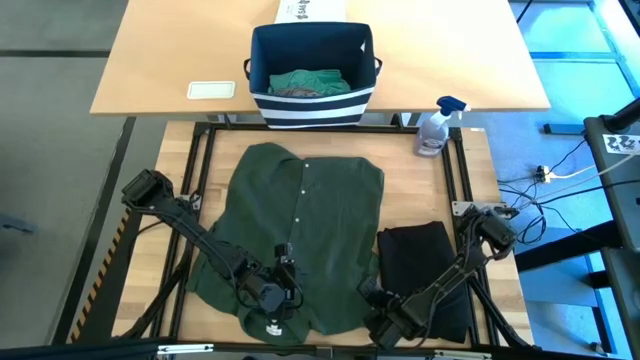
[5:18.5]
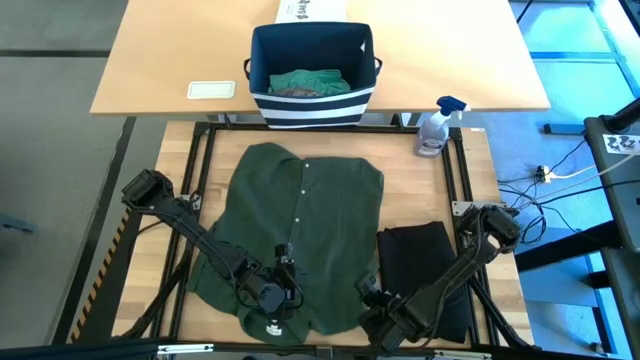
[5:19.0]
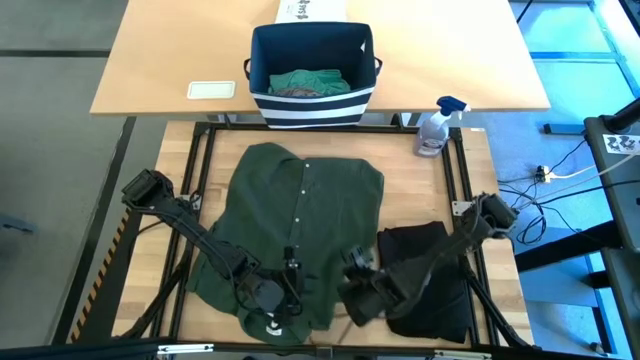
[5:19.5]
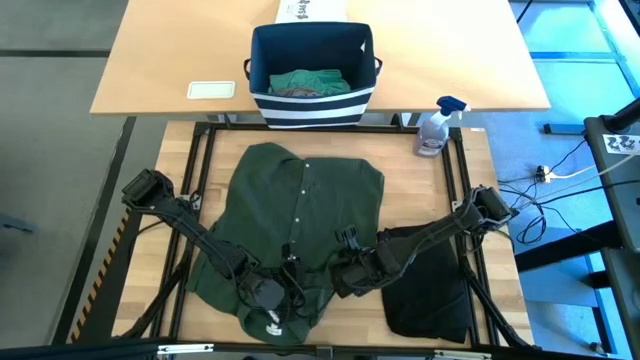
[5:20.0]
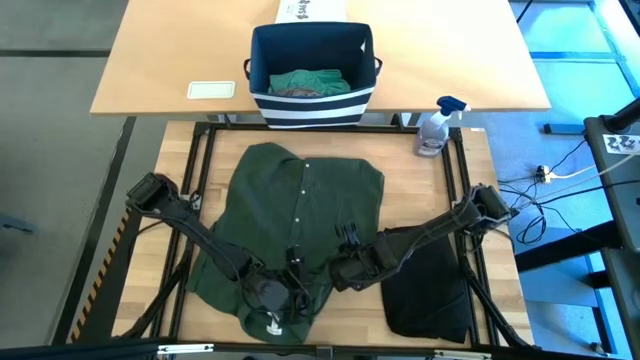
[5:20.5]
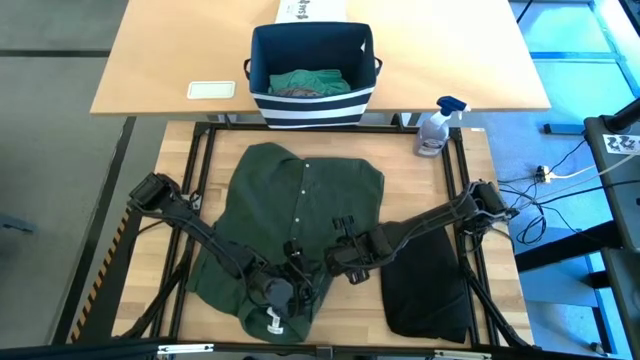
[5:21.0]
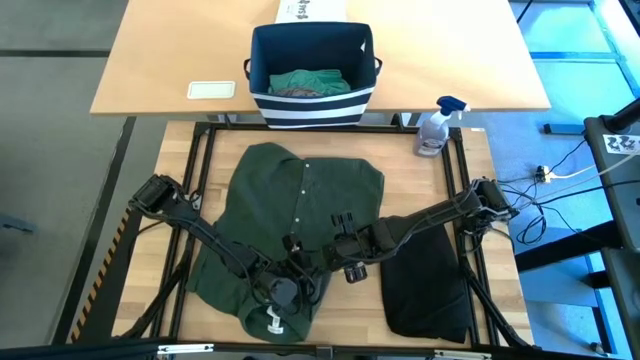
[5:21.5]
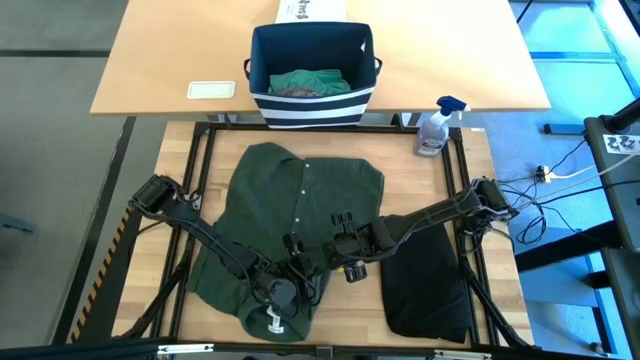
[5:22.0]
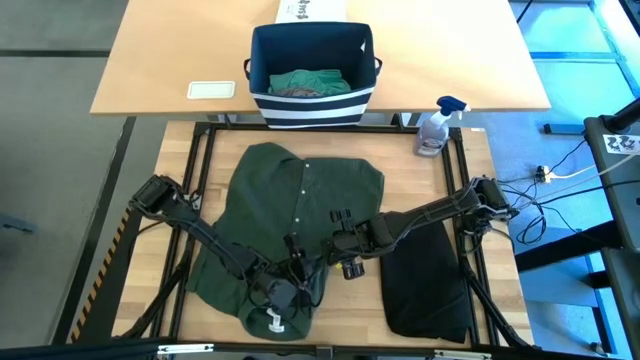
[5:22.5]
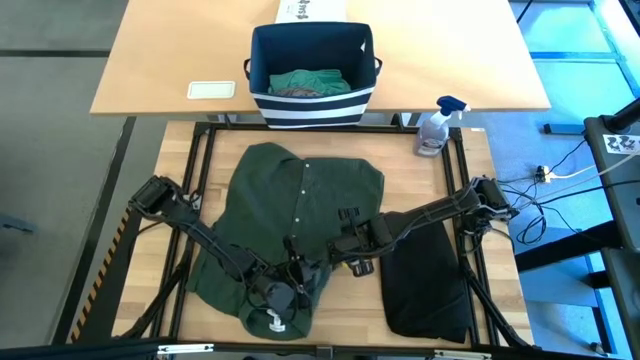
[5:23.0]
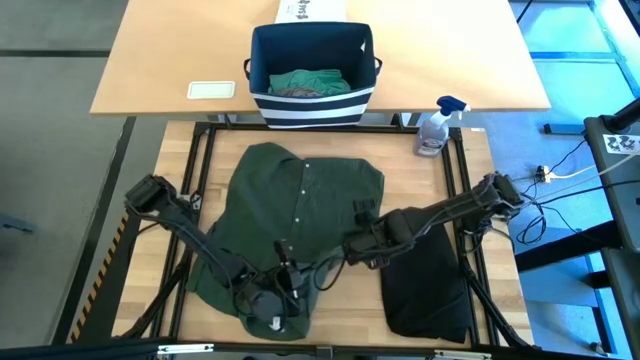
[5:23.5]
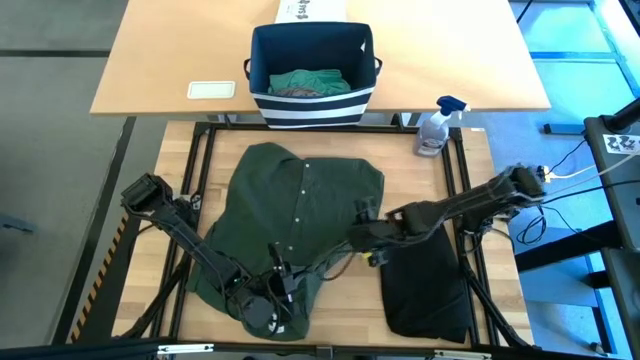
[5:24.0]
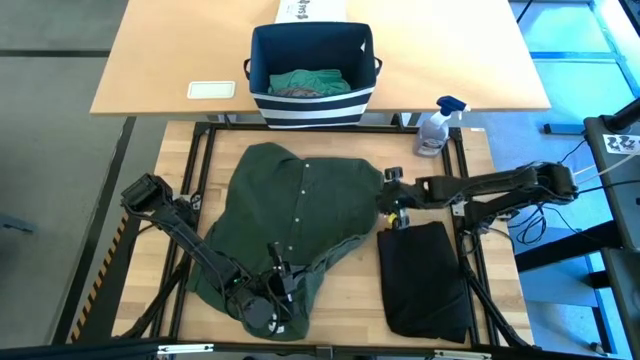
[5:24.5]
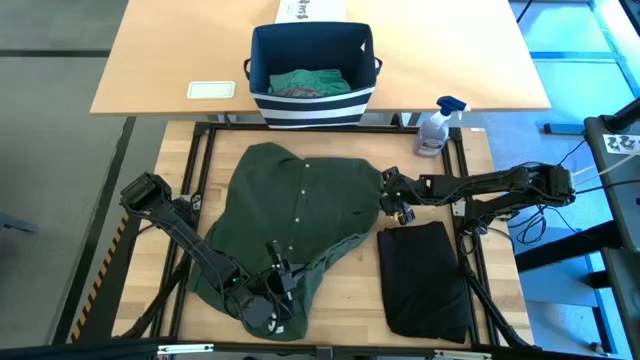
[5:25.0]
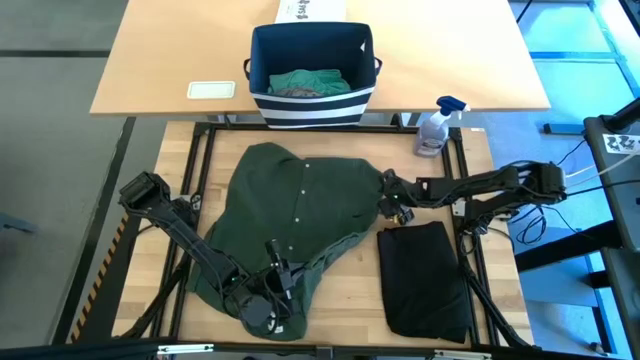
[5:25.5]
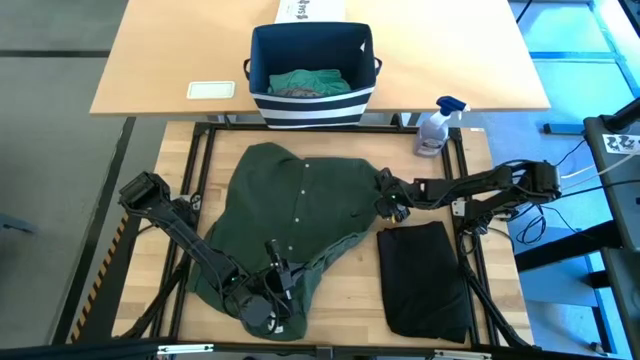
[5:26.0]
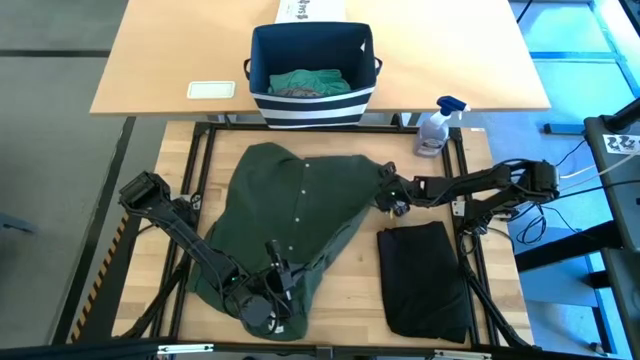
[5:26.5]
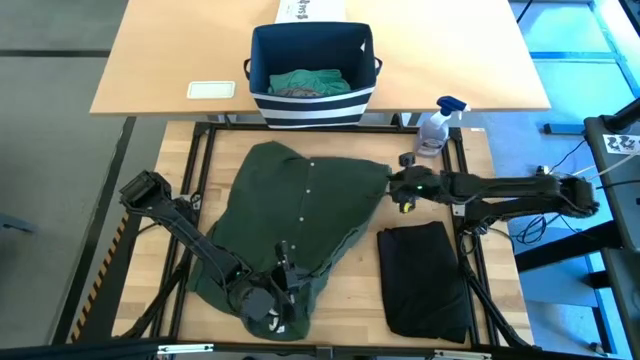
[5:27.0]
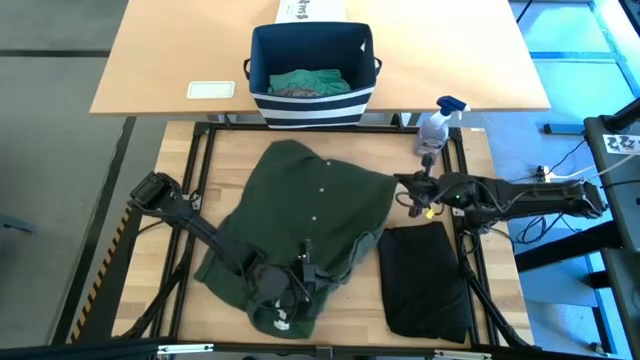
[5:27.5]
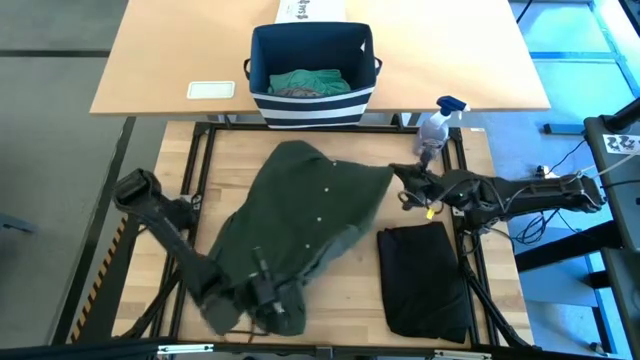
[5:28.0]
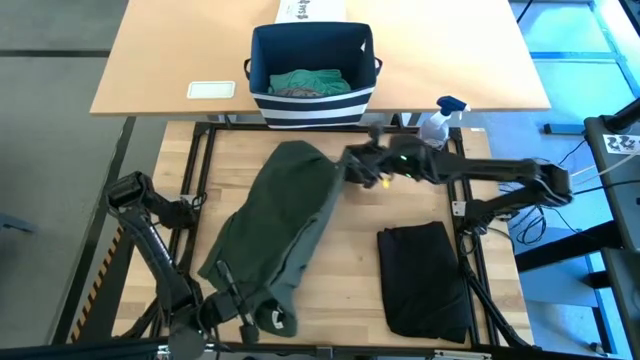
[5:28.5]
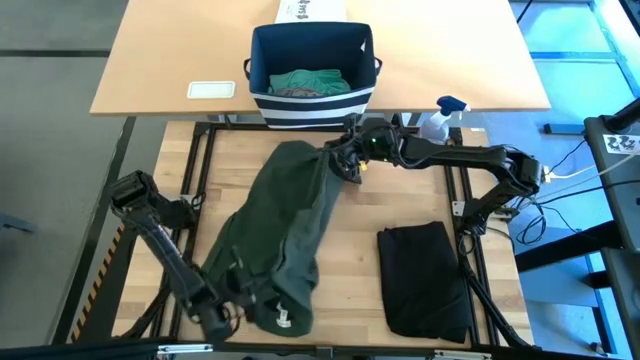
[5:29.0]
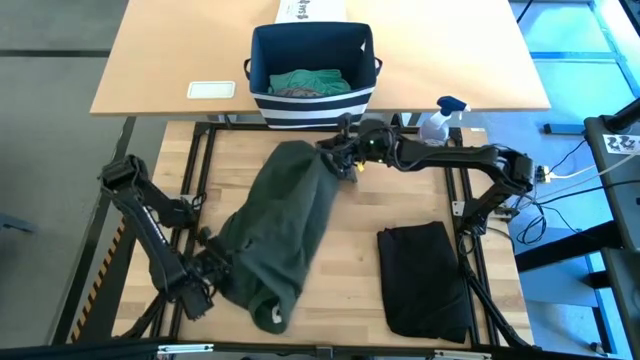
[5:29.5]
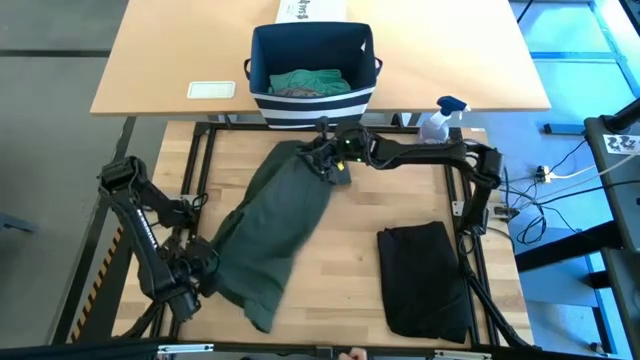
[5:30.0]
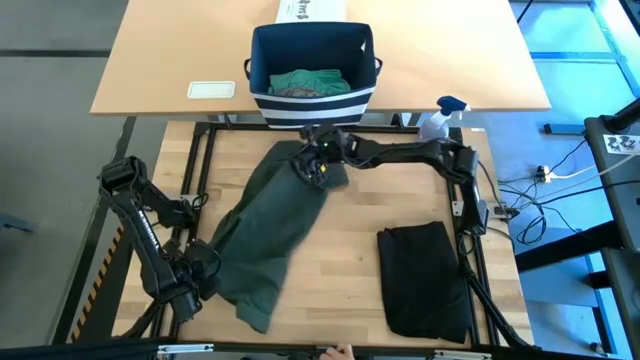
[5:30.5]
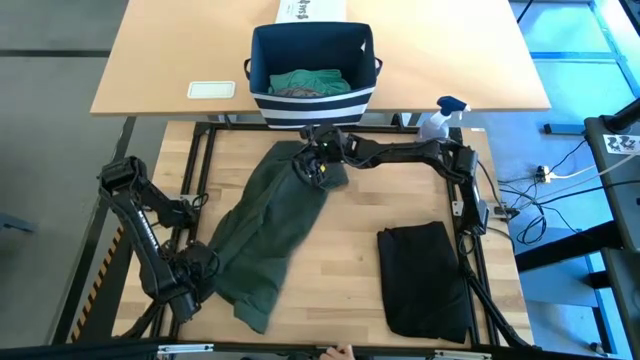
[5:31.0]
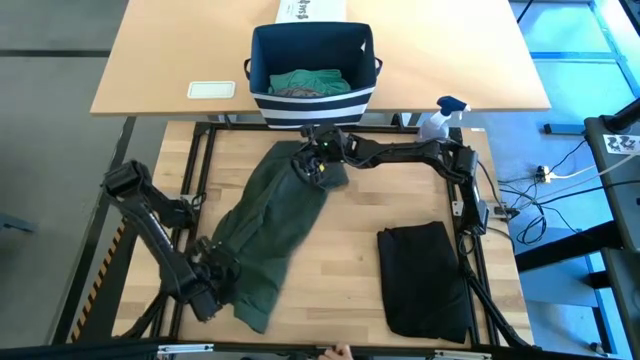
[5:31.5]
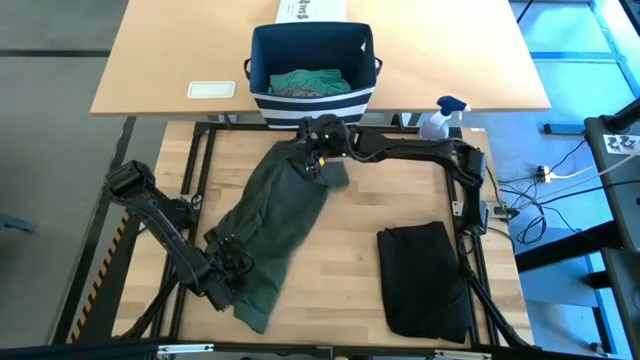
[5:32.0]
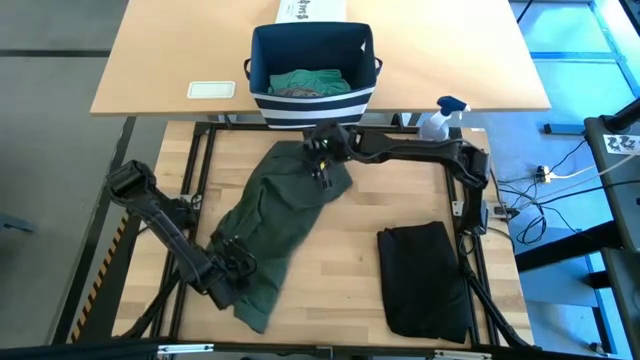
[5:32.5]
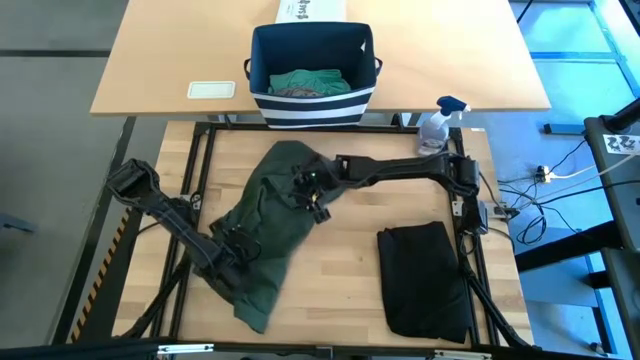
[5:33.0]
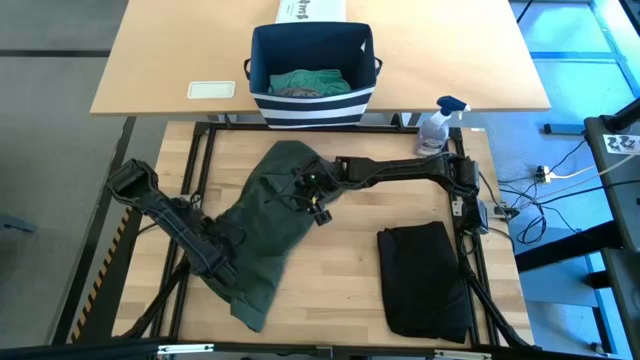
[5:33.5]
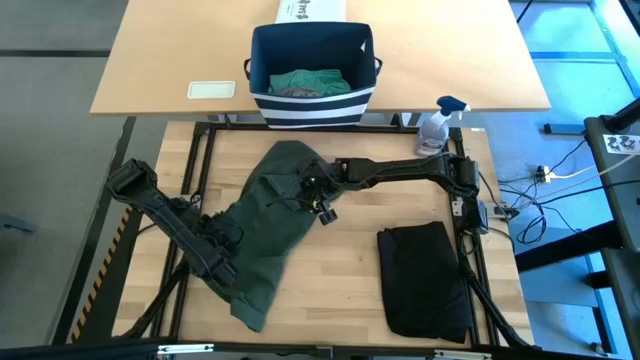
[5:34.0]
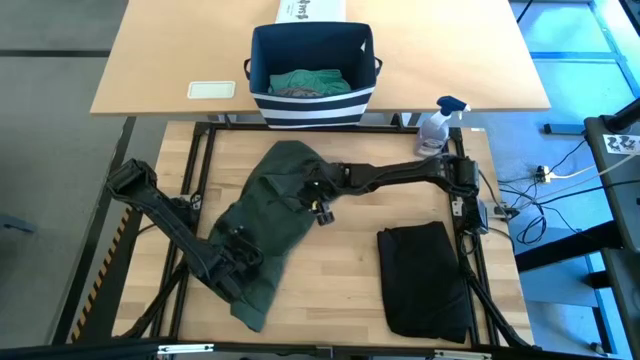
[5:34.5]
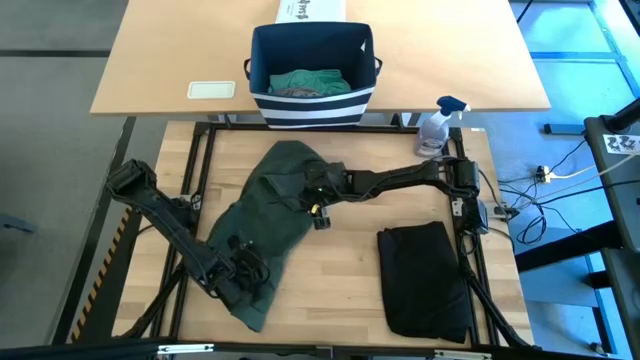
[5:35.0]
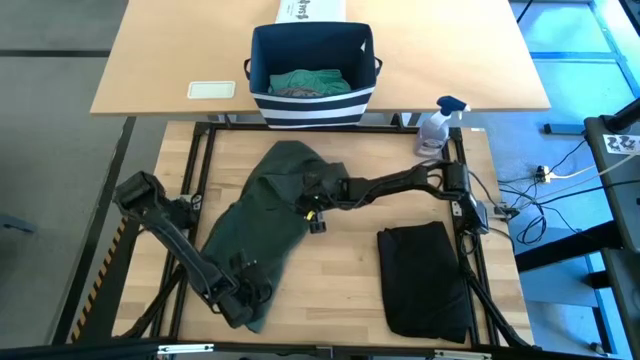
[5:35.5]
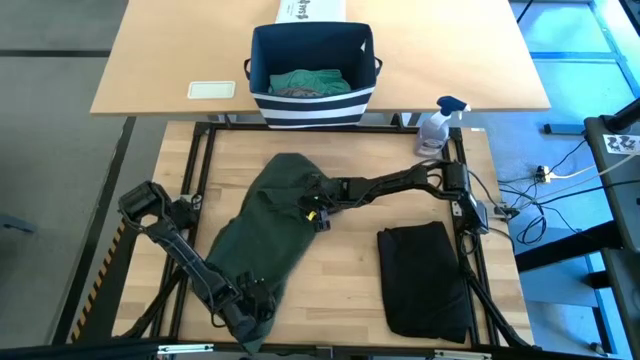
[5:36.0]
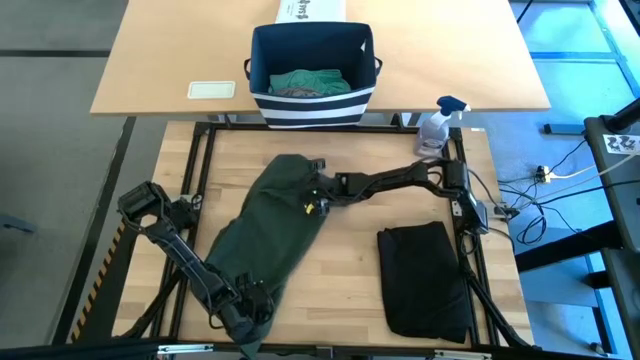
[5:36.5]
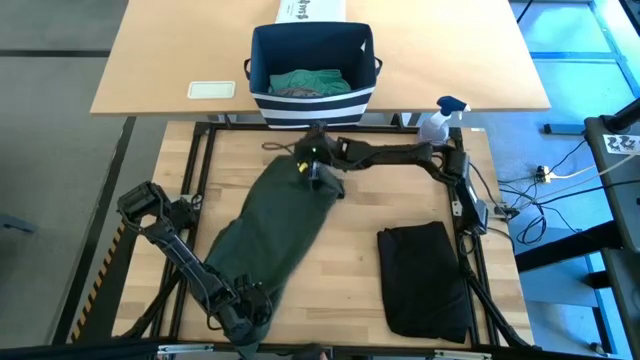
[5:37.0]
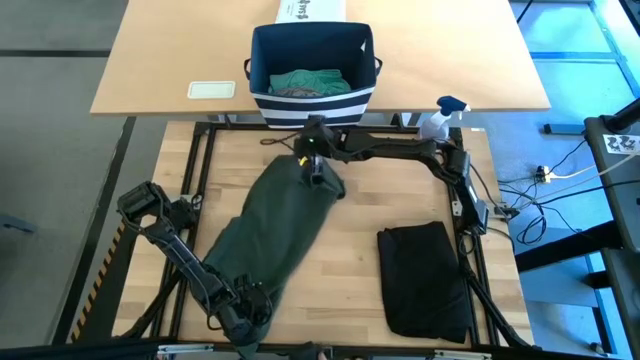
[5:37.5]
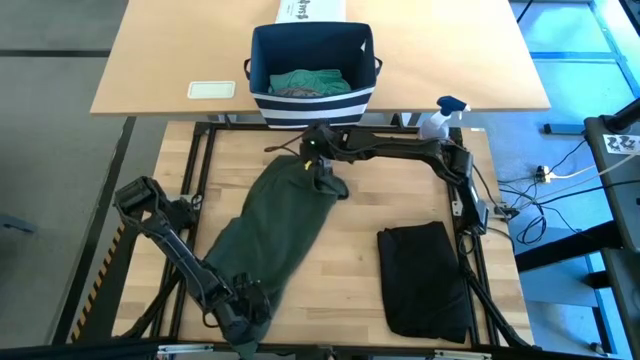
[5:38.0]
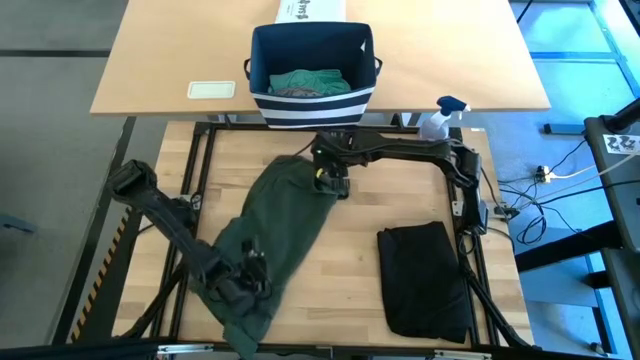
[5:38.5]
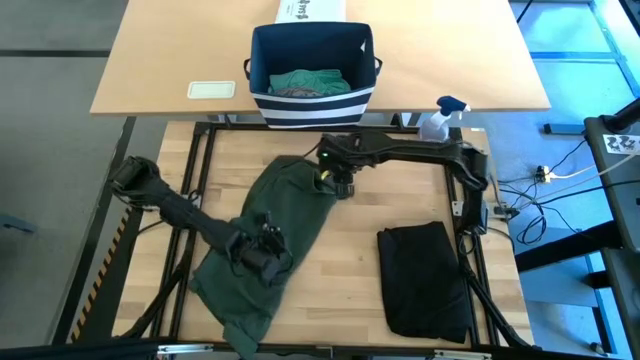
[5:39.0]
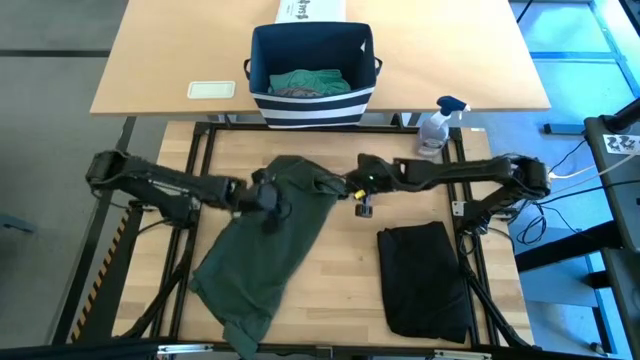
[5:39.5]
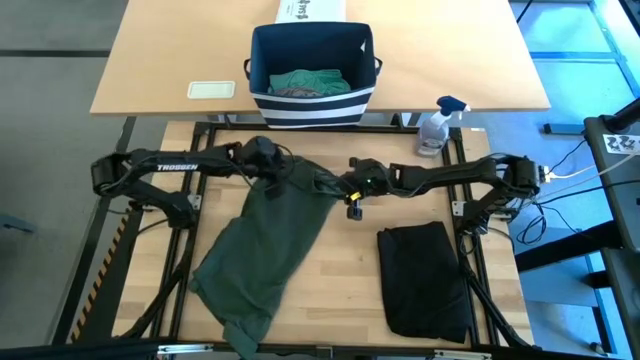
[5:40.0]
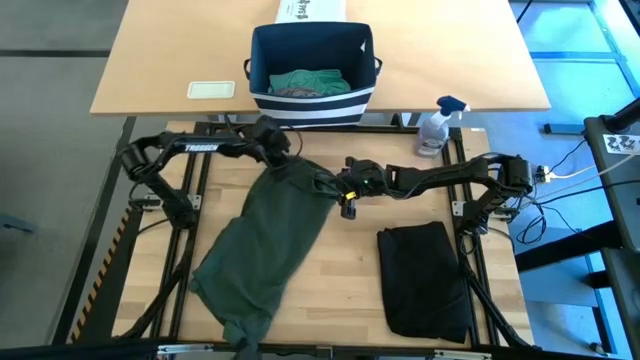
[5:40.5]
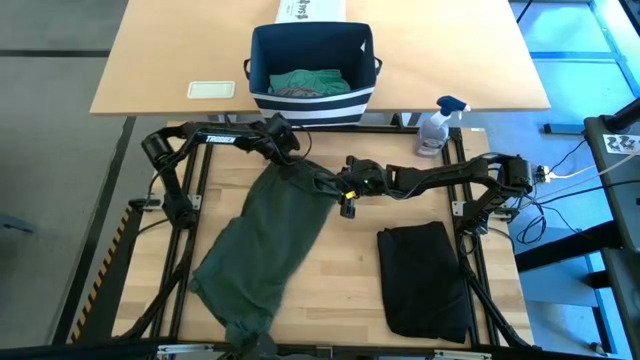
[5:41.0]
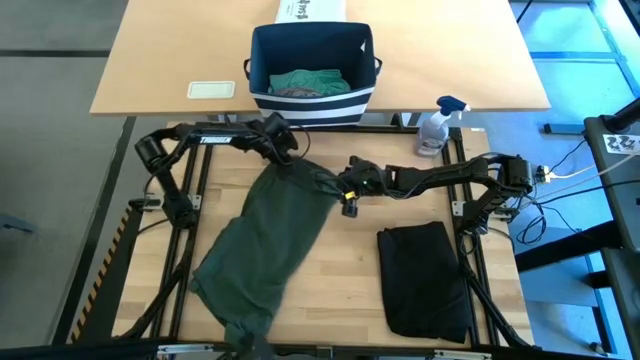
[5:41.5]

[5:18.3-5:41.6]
Task: Fold Laundry from Bin
Fold the green polo shirt
